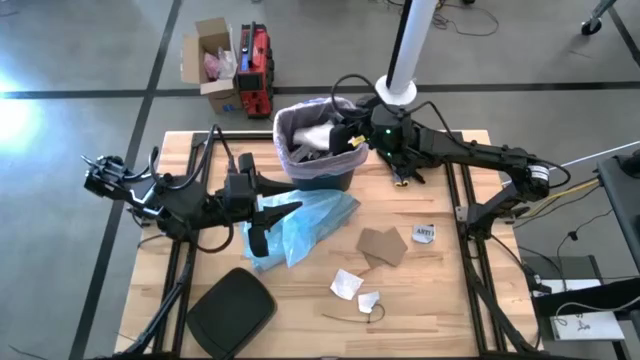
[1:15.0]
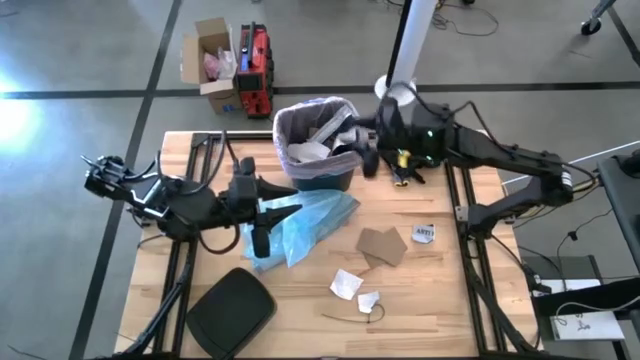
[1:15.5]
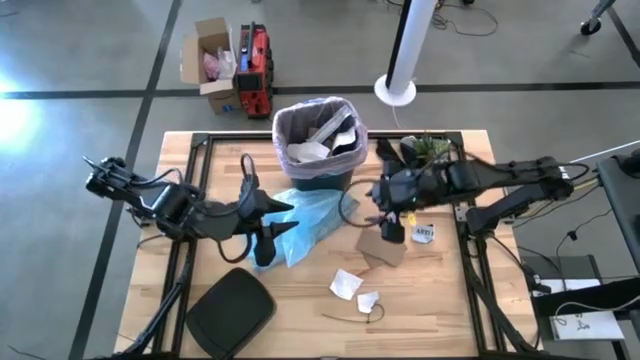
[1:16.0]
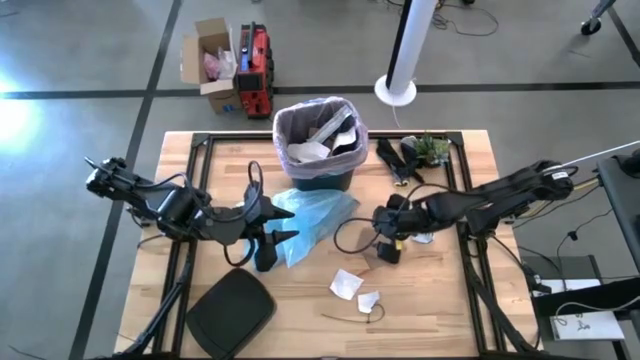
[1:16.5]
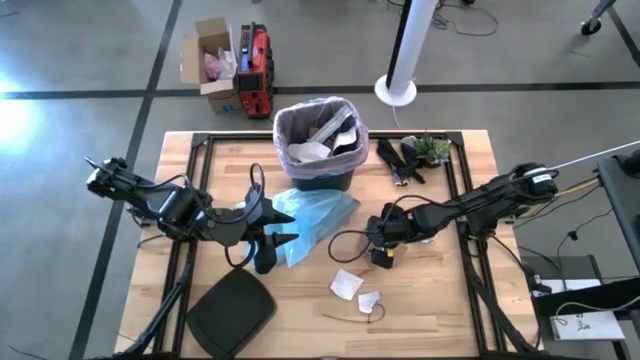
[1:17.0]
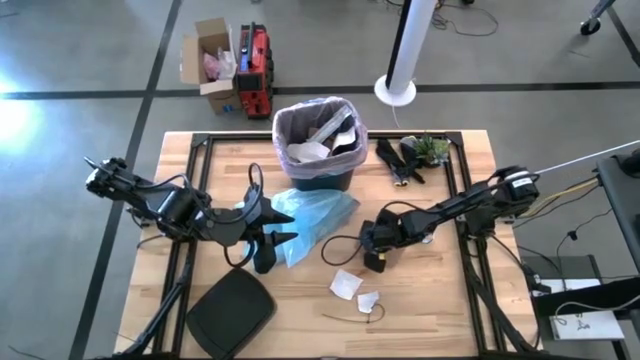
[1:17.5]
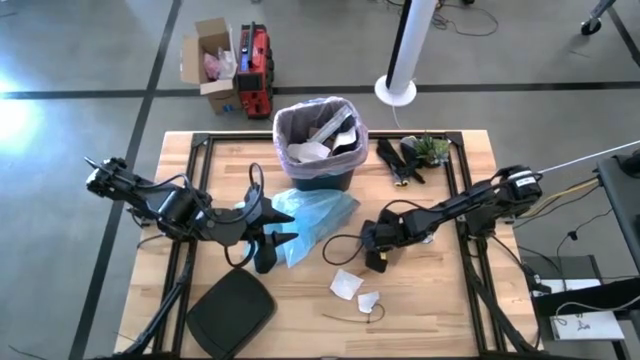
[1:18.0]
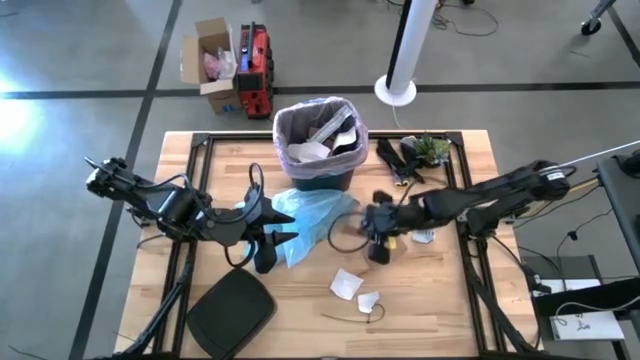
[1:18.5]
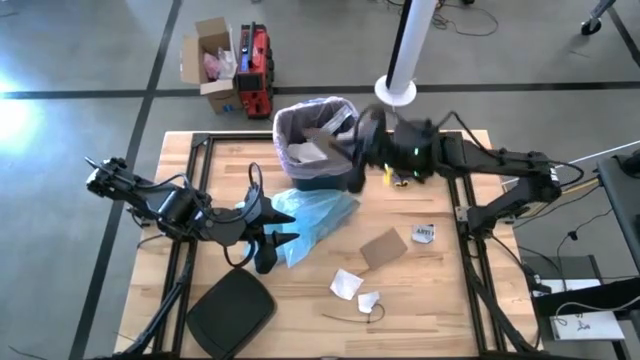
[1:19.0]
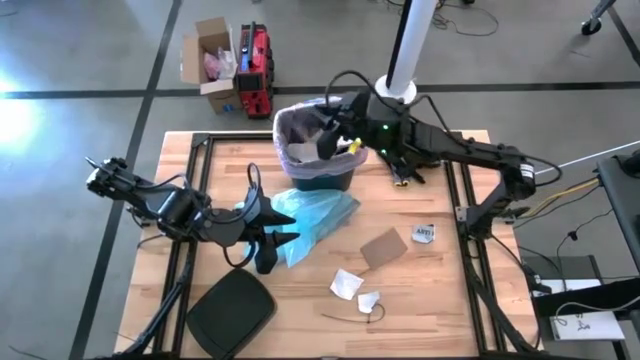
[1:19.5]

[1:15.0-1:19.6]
Task: place trash/remove bag and relplace
Put the brown cardboard into the trash bin

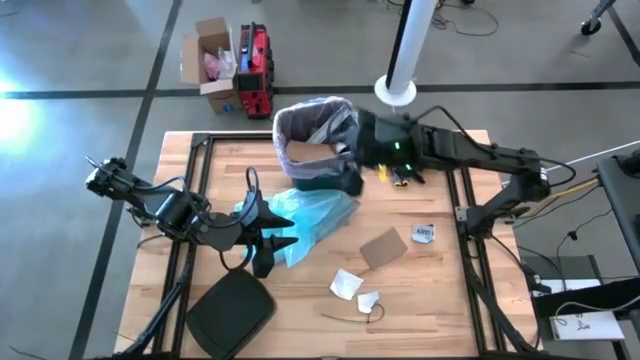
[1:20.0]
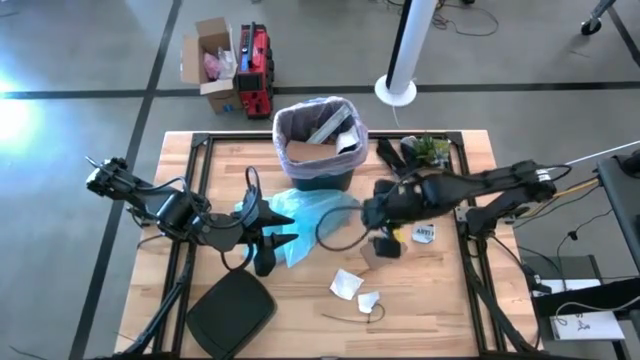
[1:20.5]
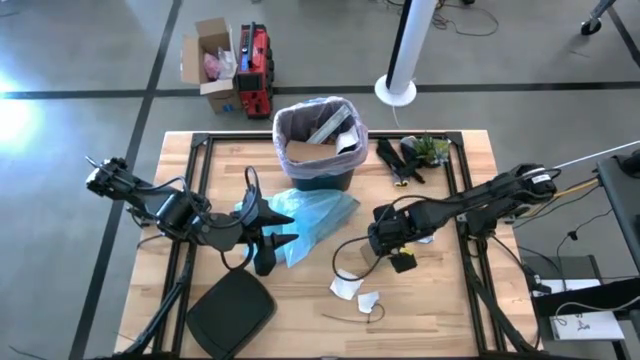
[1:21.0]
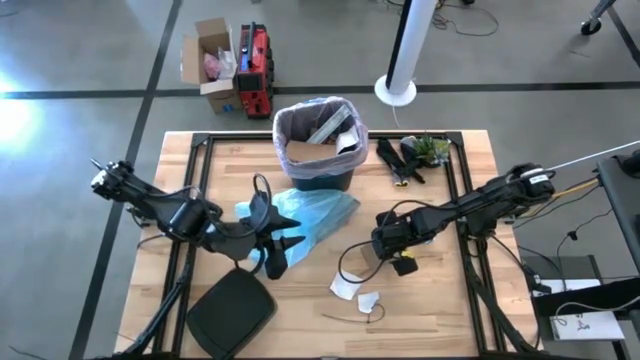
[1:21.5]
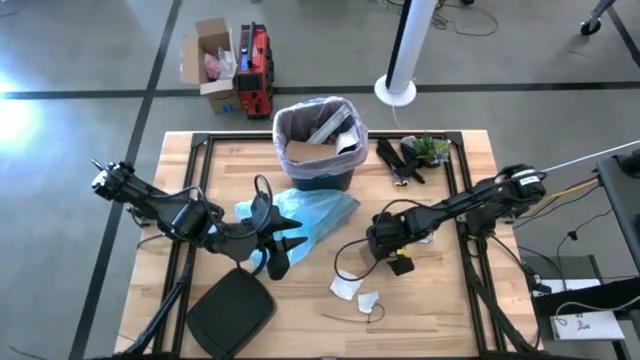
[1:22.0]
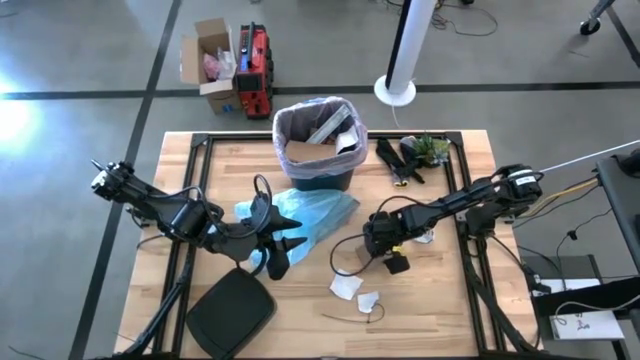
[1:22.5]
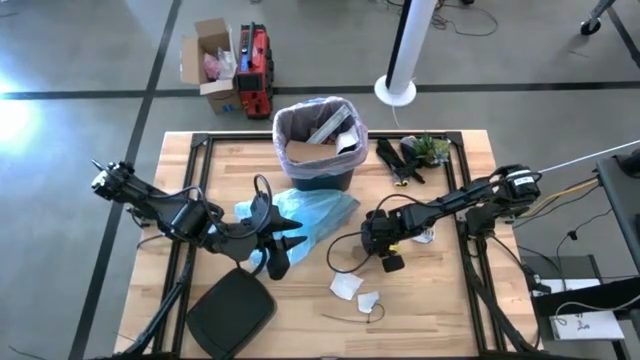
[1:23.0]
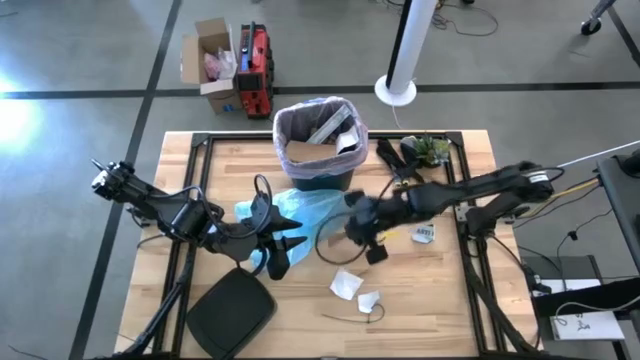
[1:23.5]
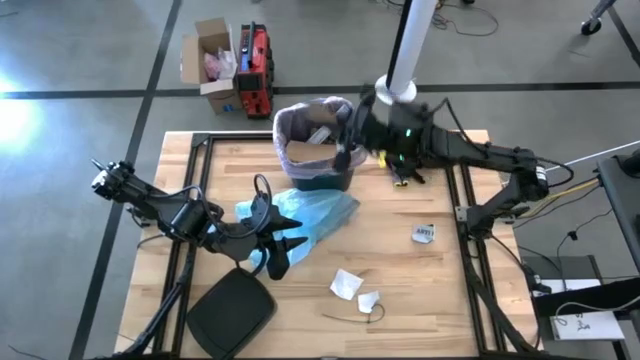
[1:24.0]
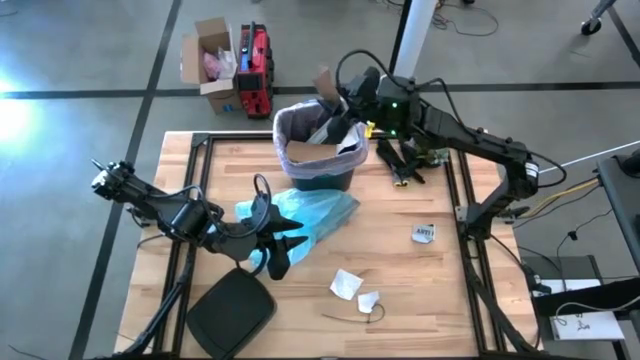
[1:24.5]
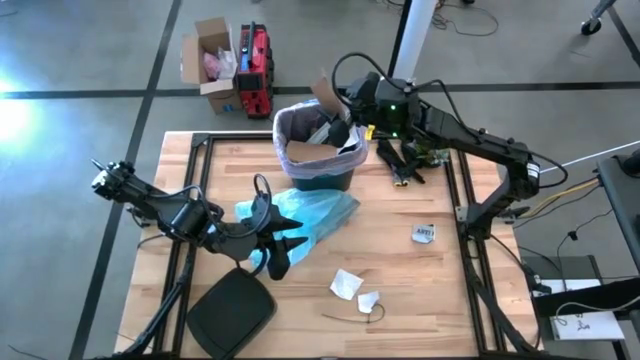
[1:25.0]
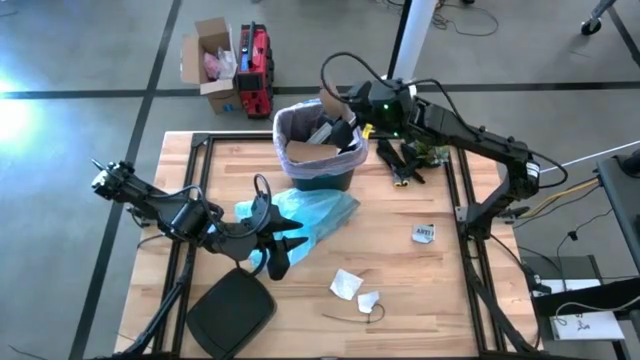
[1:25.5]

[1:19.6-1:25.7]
Put the brown cardboard into the trash bin

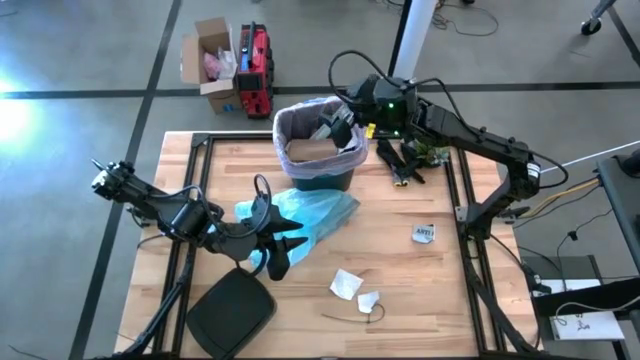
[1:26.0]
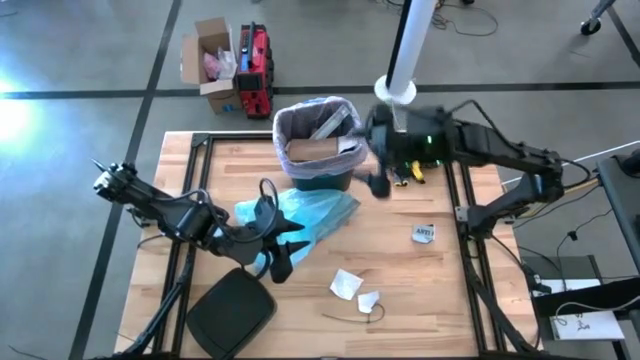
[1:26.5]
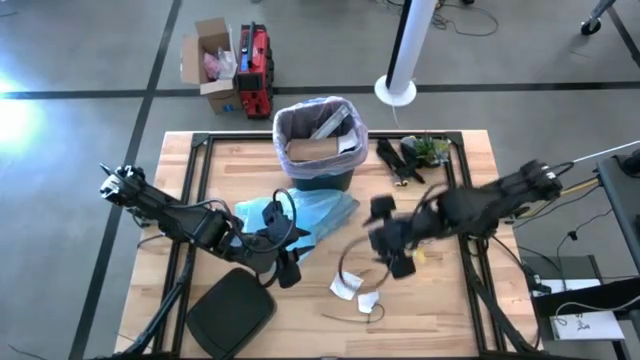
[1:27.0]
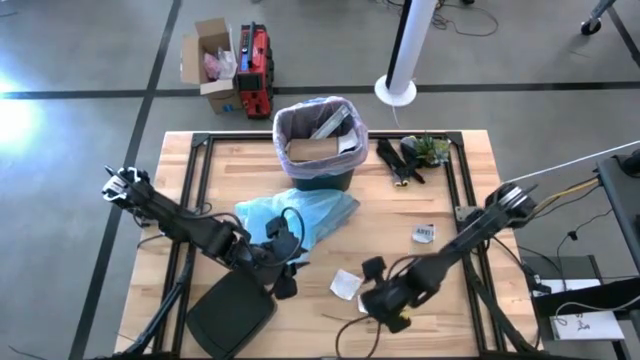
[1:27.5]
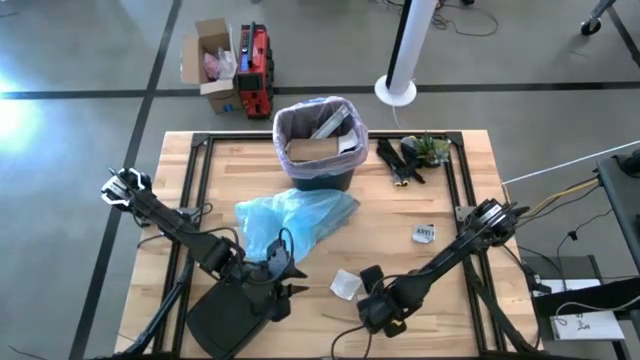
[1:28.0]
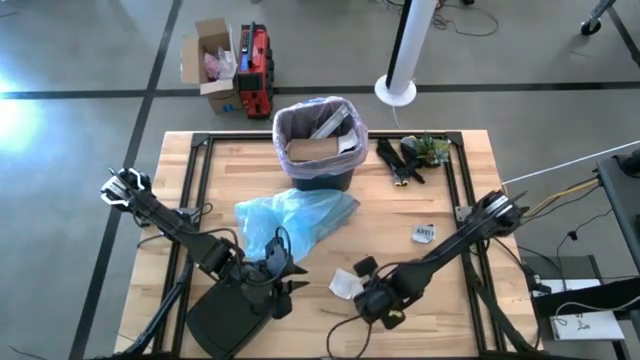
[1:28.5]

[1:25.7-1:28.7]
Put the white paper into the trash bin

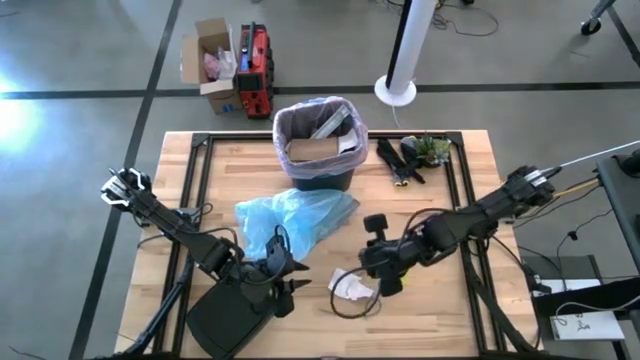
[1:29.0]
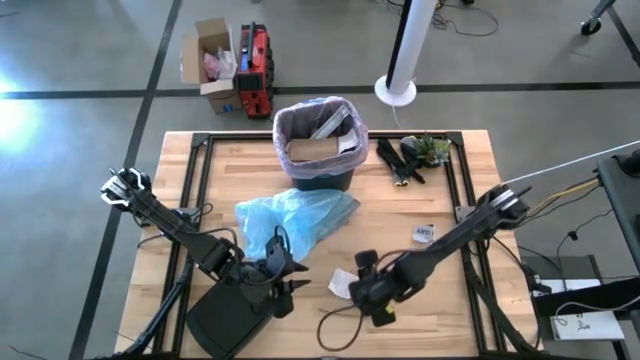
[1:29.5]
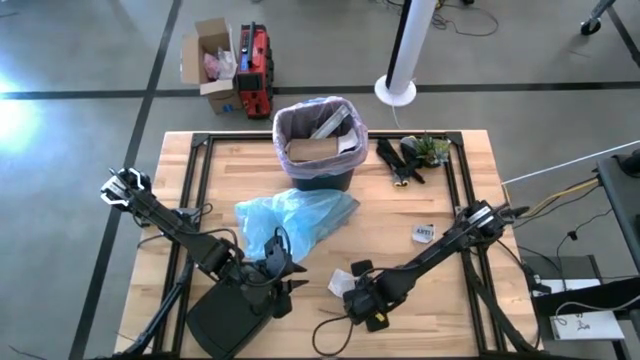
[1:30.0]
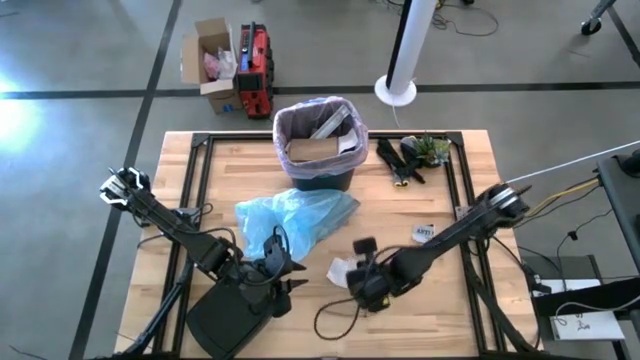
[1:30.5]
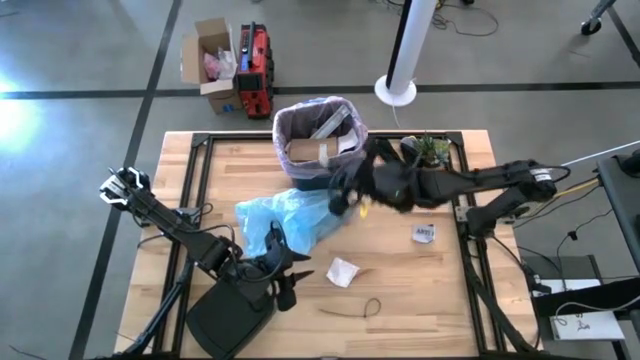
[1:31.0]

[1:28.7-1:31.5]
Put the white paper into the trash bin

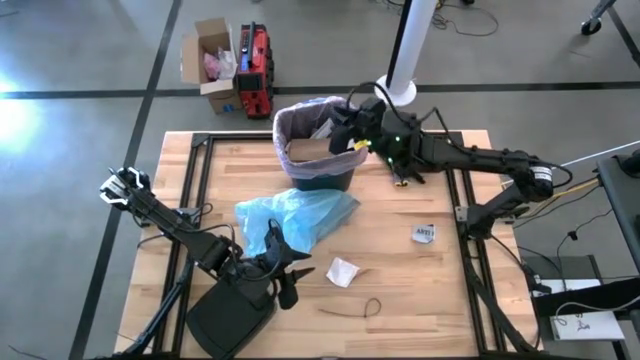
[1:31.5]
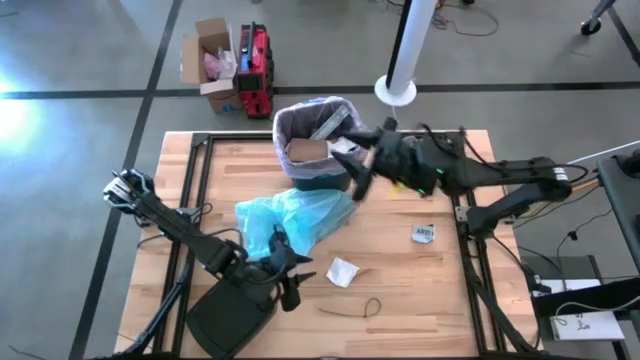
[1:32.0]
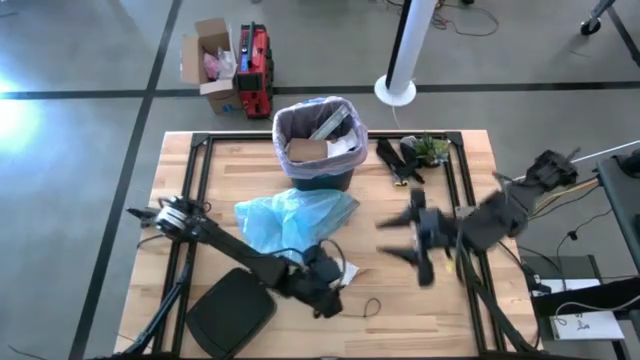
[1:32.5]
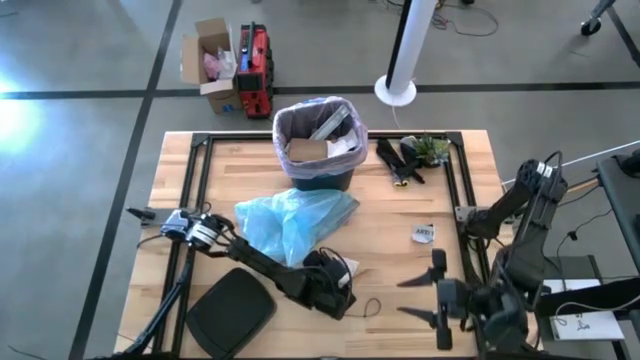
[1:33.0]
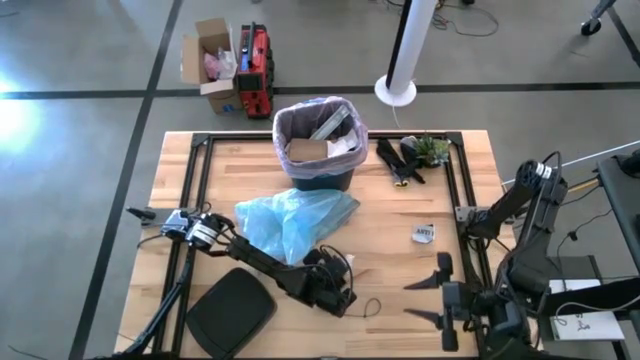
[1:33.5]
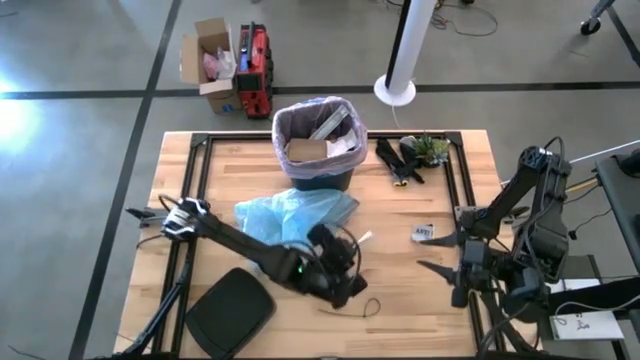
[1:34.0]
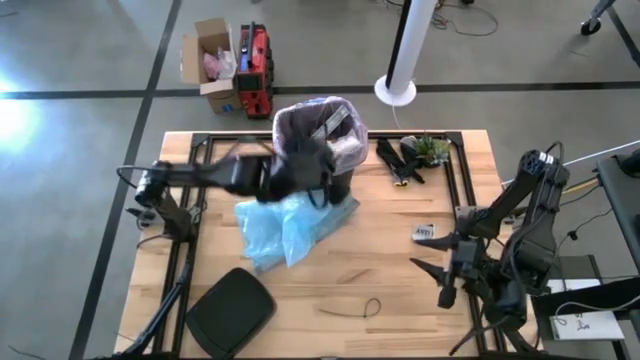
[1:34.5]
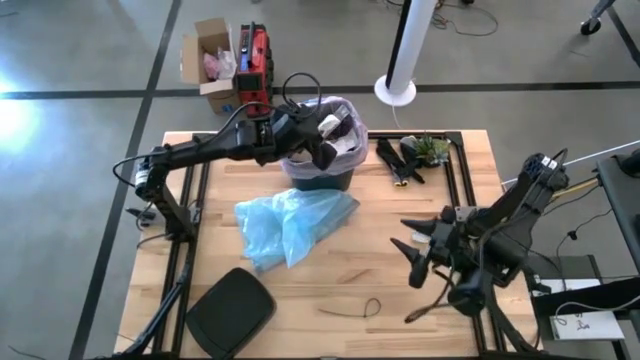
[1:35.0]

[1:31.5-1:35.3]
Put the white paper into the trash bin

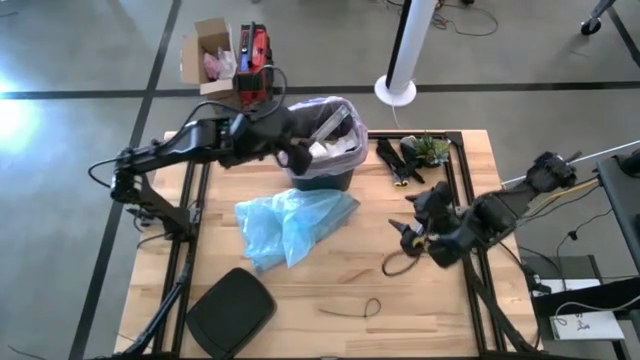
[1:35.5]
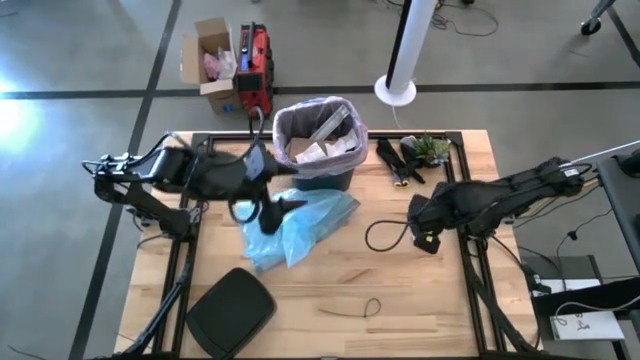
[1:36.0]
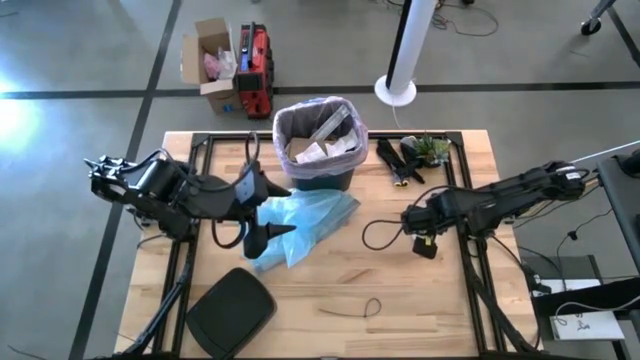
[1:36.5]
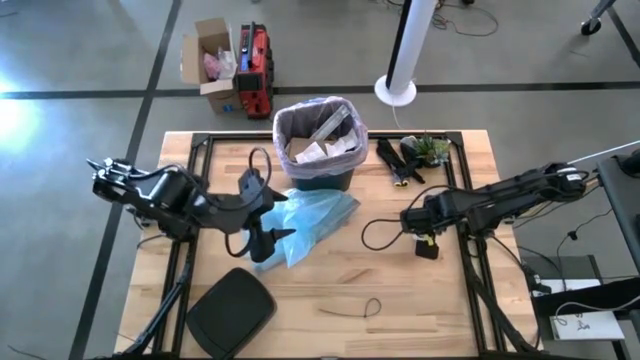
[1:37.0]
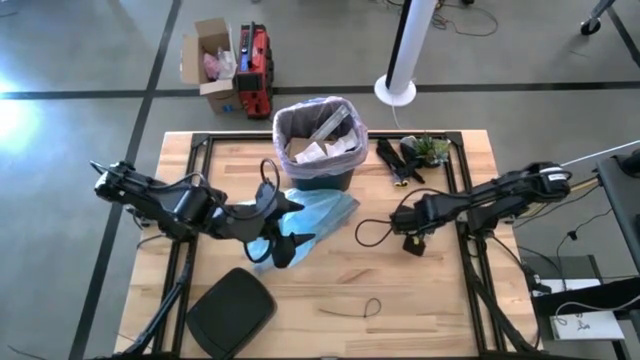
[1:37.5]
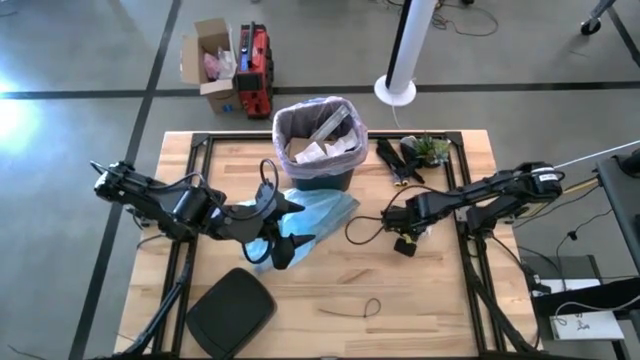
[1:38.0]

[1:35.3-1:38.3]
Put the white paper into the trash bin
